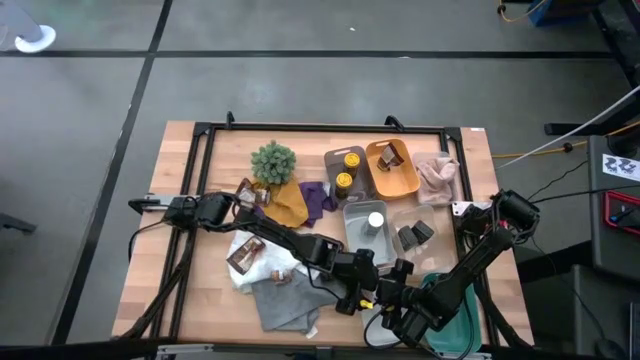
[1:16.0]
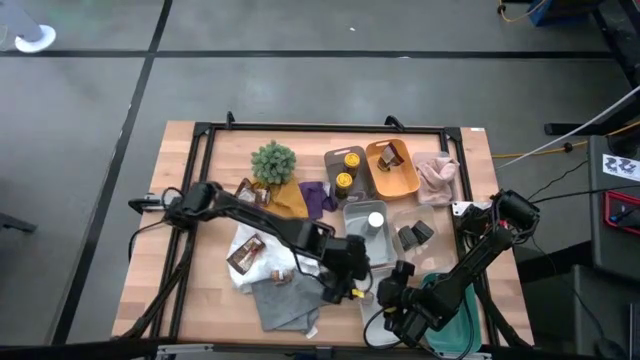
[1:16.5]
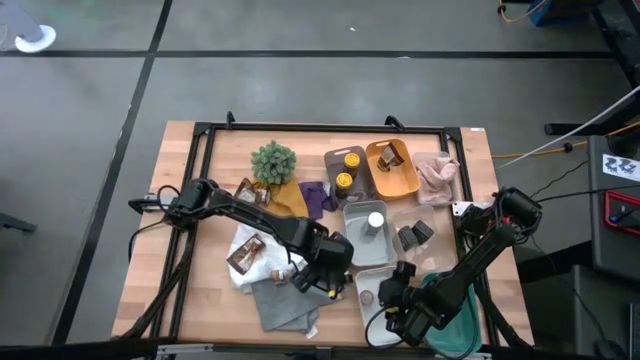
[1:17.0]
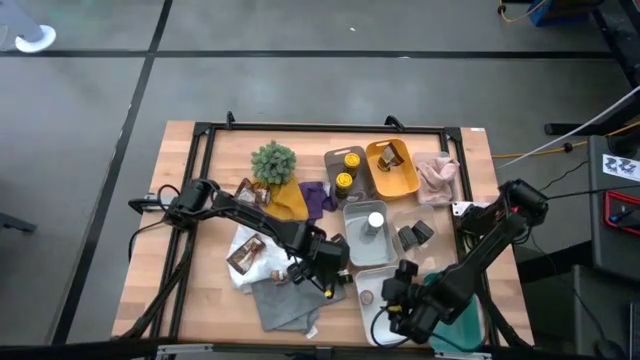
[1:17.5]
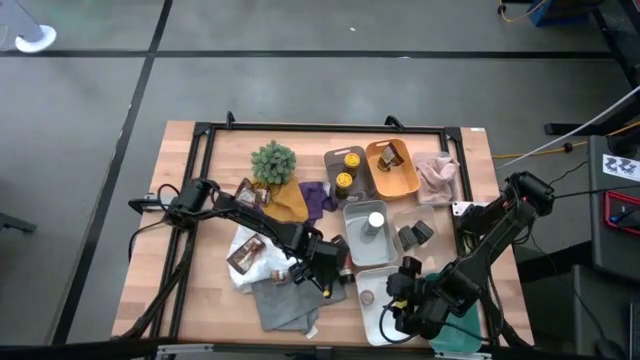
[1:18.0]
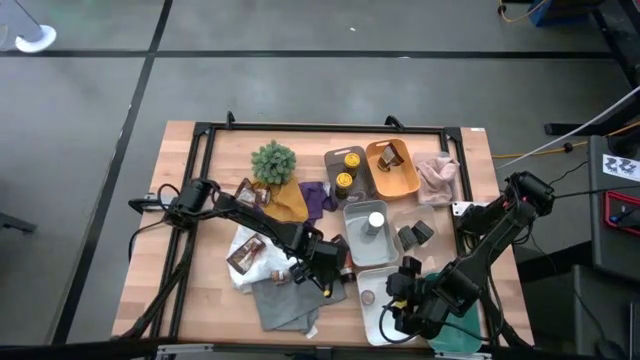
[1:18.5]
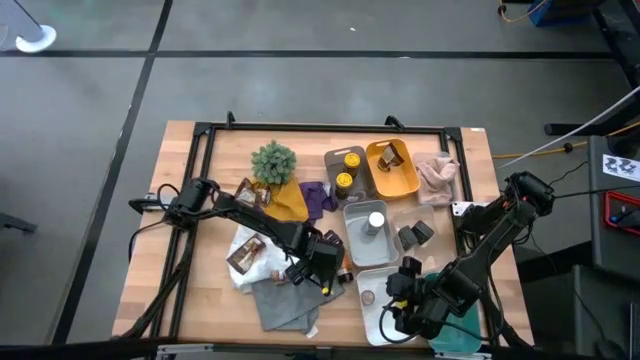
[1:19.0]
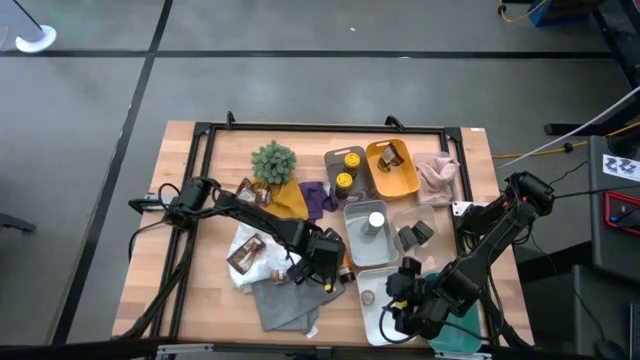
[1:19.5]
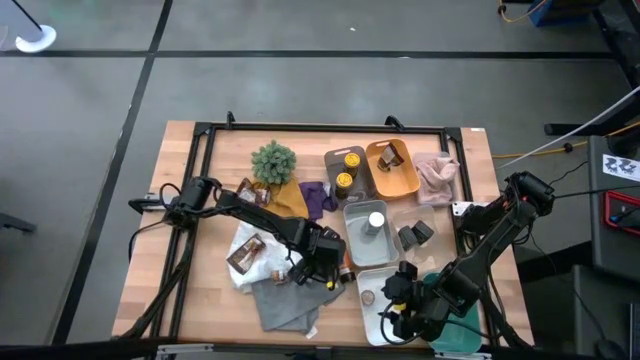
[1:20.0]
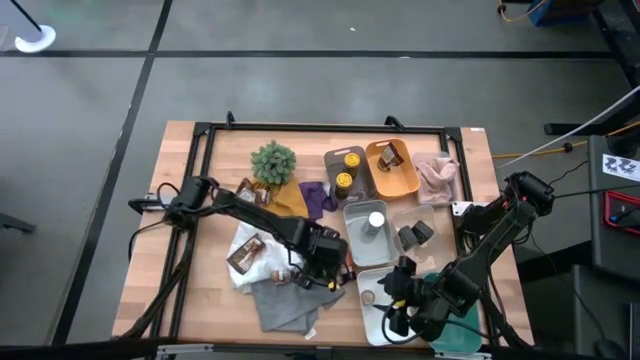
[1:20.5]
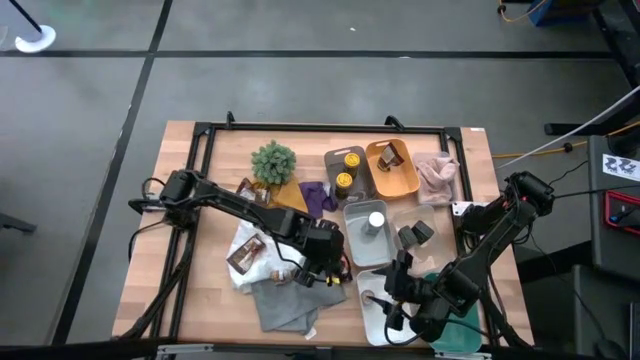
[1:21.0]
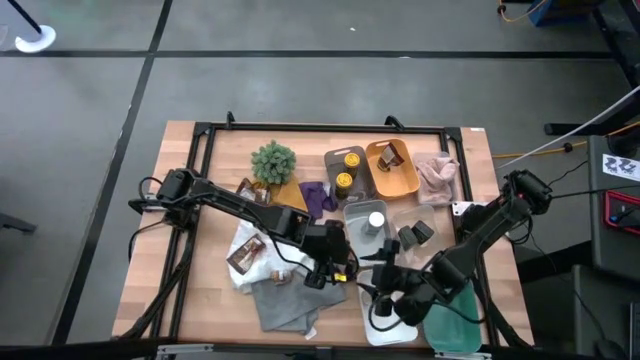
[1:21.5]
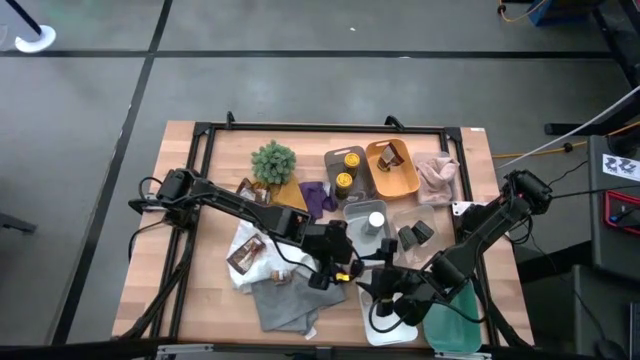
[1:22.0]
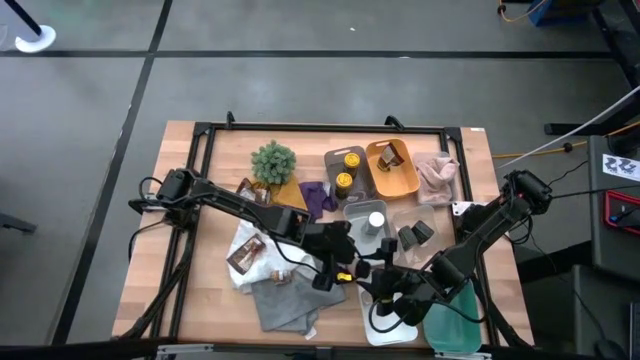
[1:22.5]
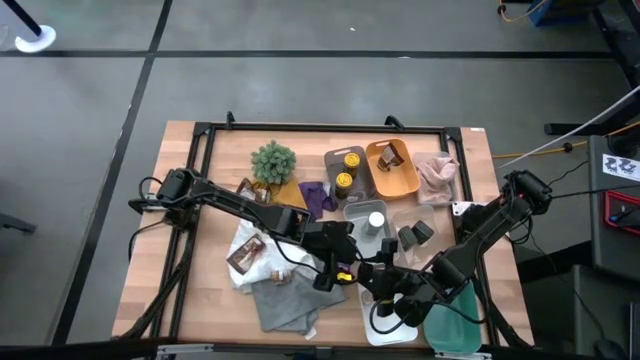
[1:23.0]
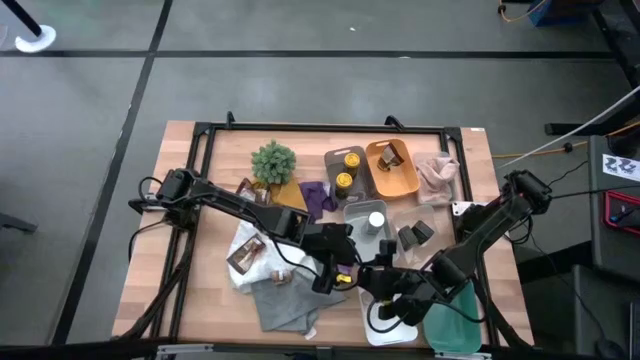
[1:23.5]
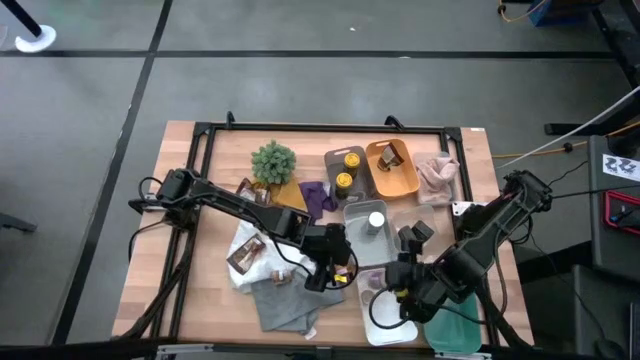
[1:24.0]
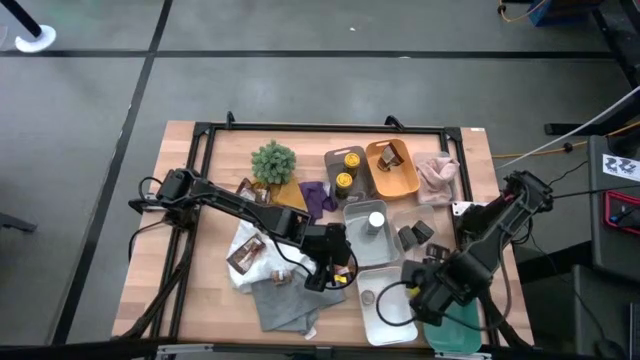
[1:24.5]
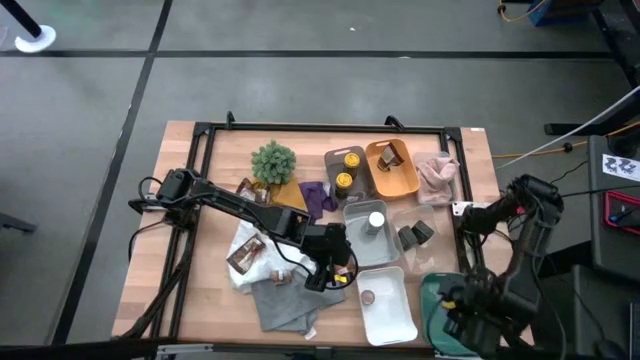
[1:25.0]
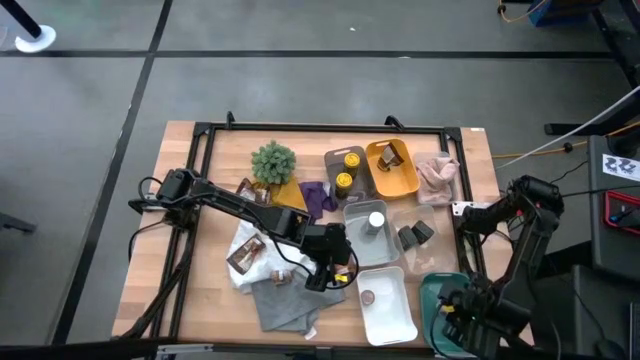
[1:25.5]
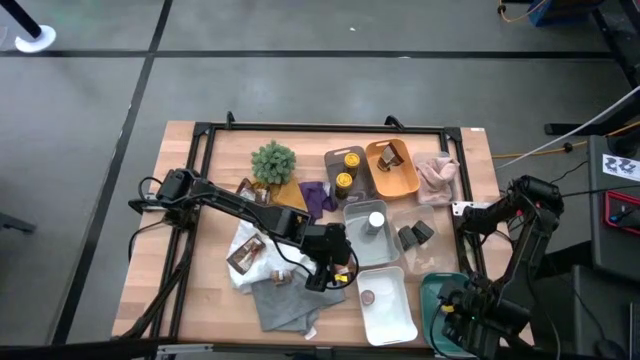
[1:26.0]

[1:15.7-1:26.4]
Task: Sort spices by type
Put the black seasoning bottle into the green bin

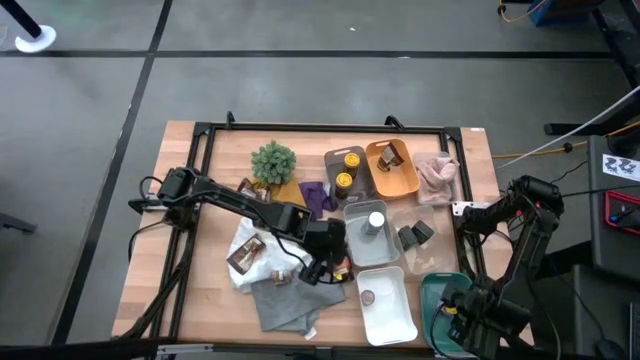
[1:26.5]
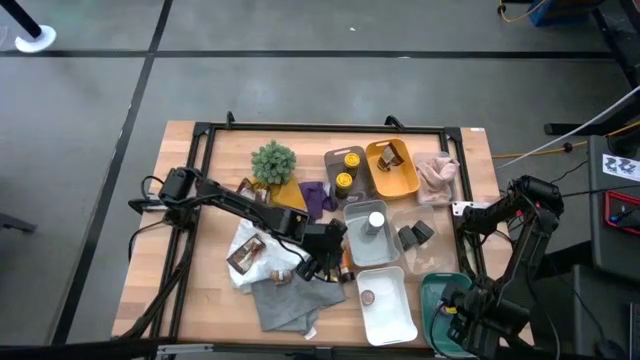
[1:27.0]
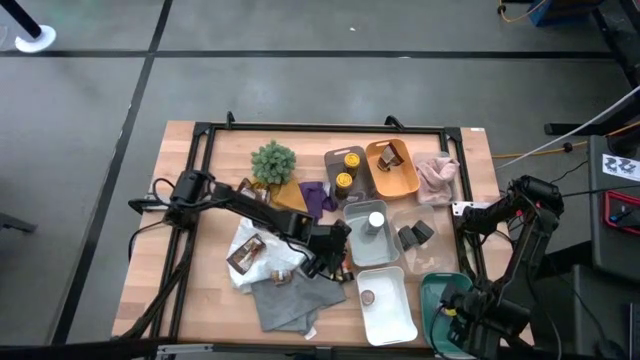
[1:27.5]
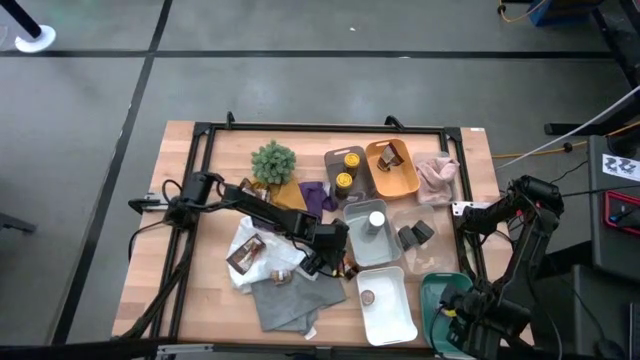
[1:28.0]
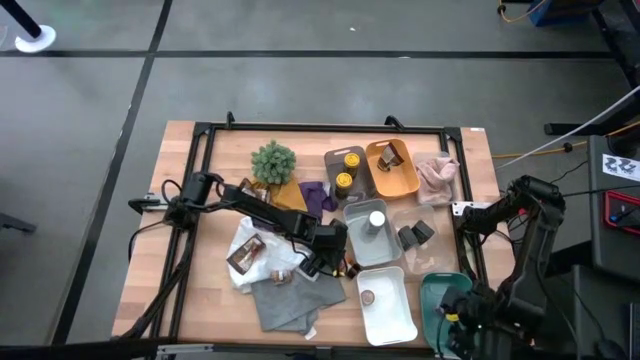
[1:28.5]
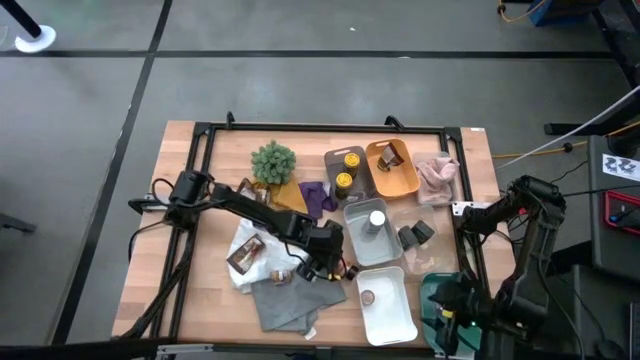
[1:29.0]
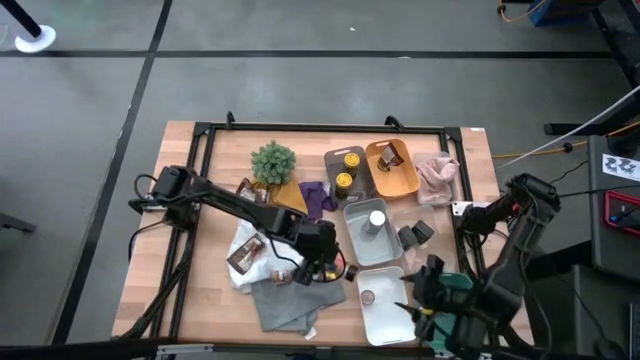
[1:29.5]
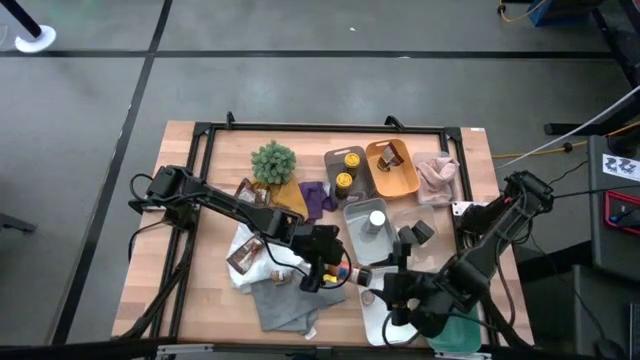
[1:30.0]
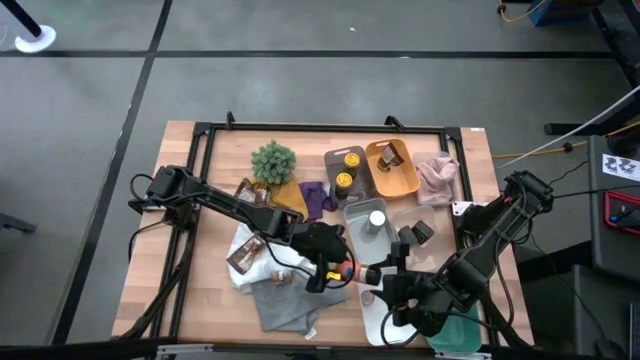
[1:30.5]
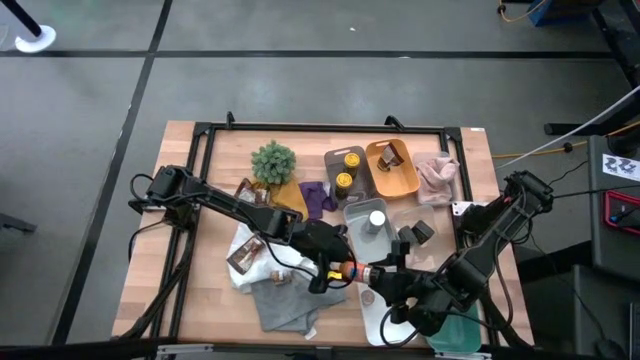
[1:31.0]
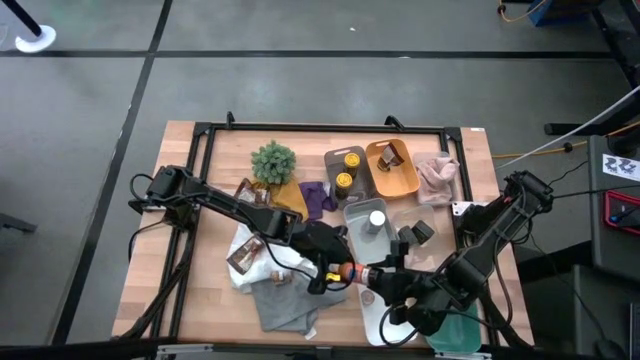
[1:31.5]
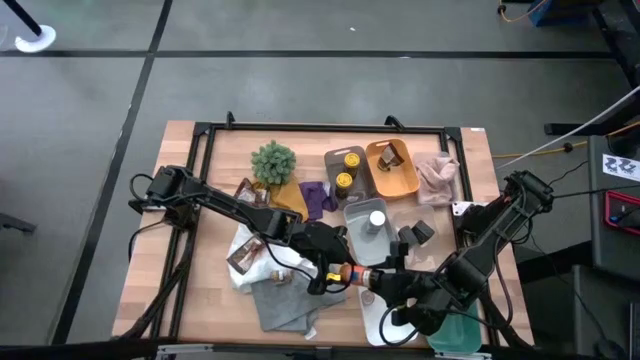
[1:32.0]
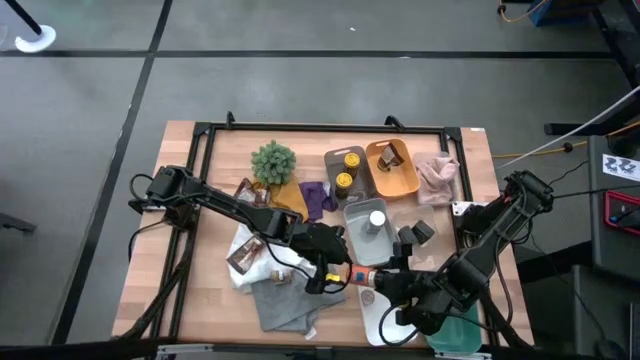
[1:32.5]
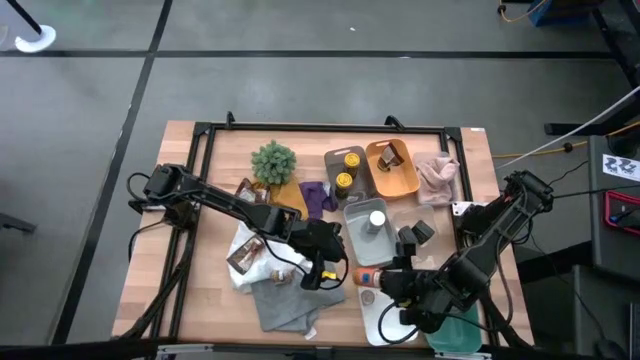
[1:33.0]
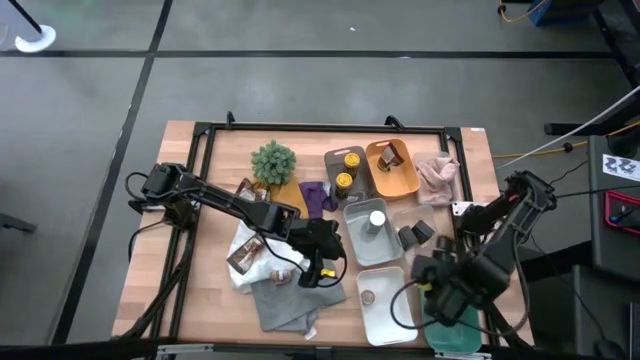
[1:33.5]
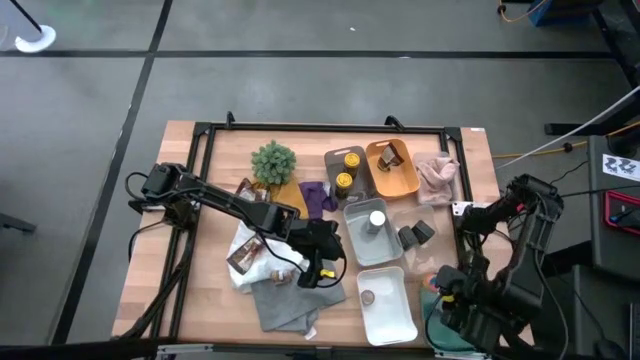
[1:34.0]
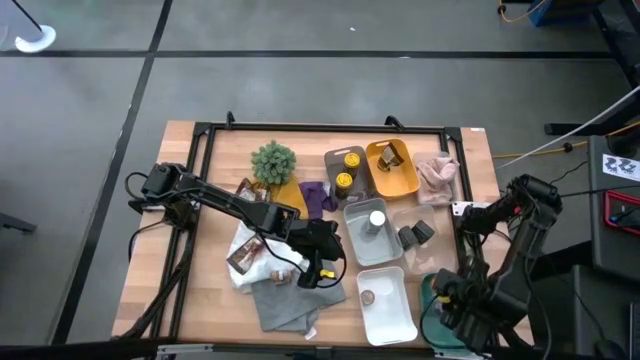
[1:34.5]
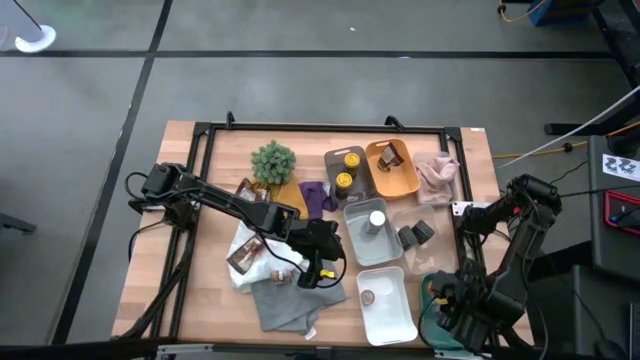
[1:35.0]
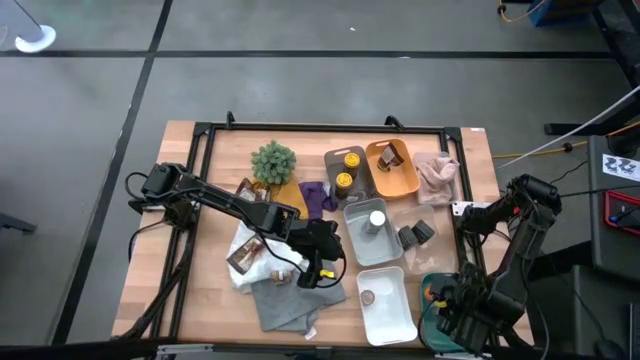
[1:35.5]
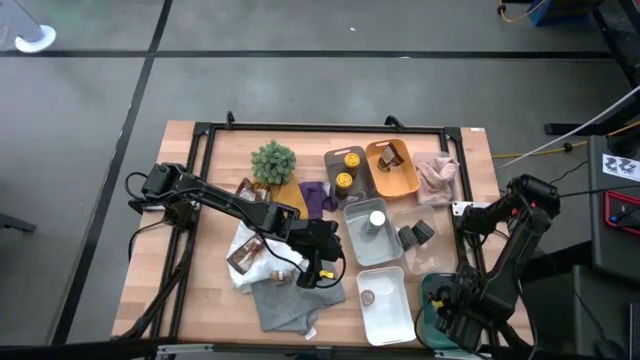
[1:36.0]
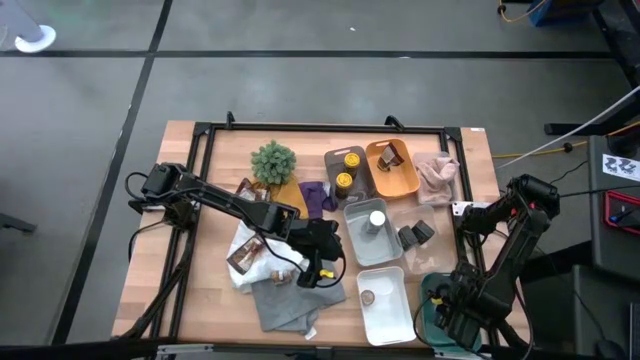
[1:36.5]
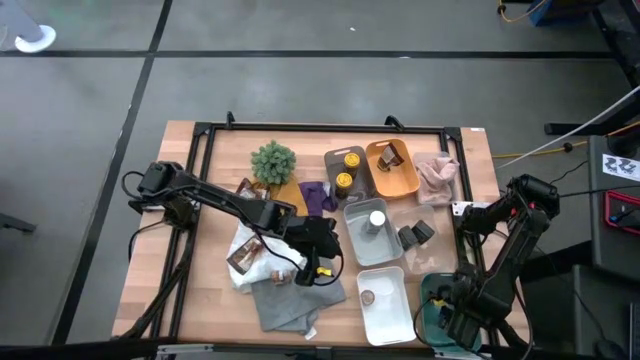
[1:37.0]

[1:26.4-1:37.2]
Put the black seasoning bottle into the green bin
